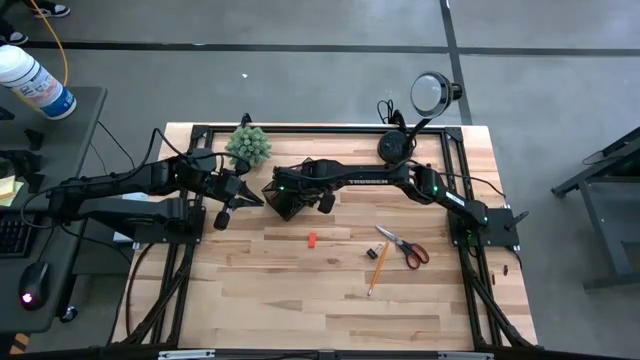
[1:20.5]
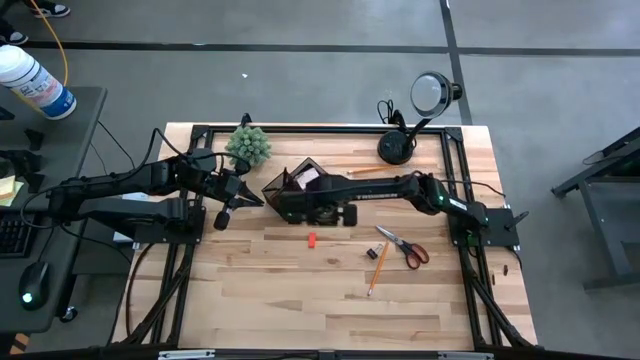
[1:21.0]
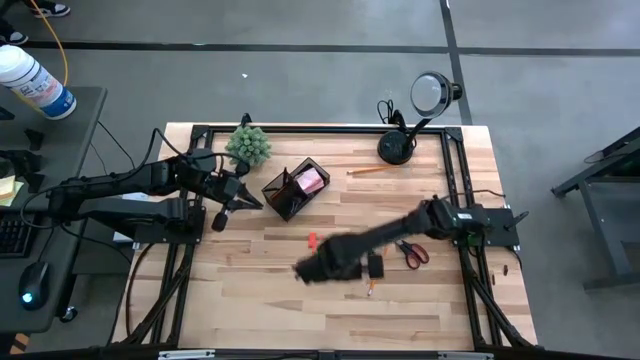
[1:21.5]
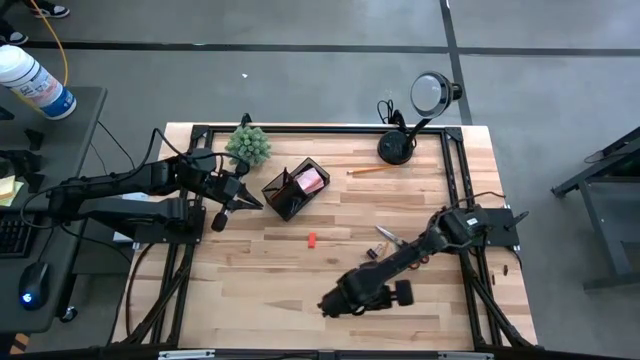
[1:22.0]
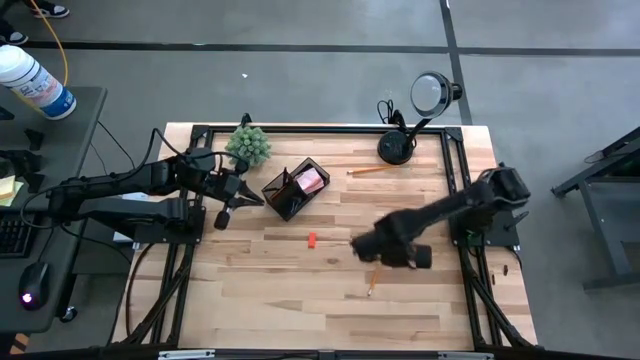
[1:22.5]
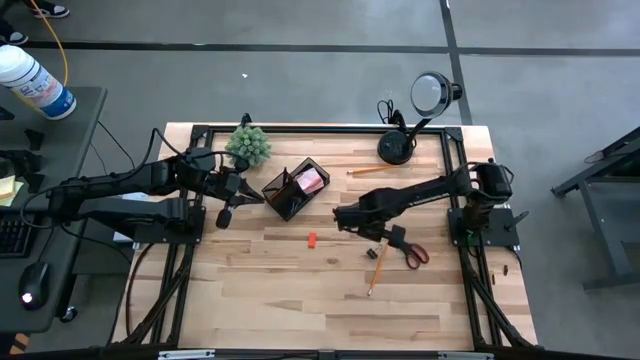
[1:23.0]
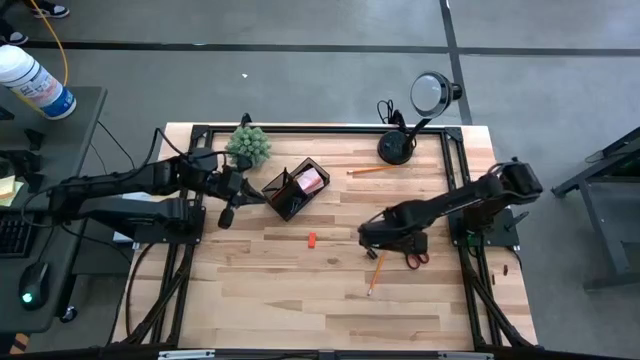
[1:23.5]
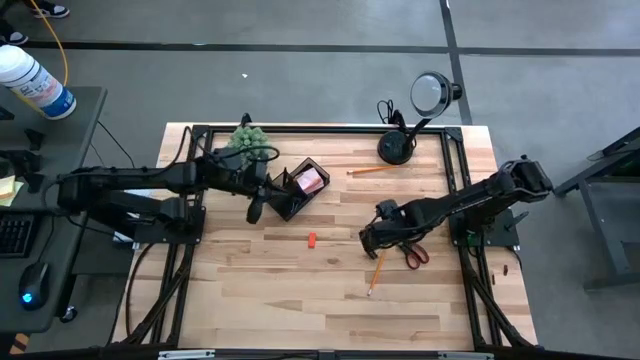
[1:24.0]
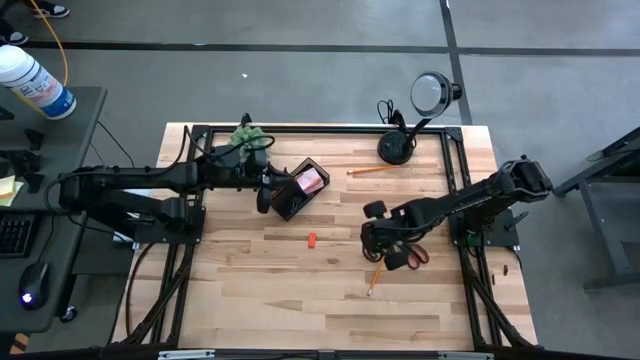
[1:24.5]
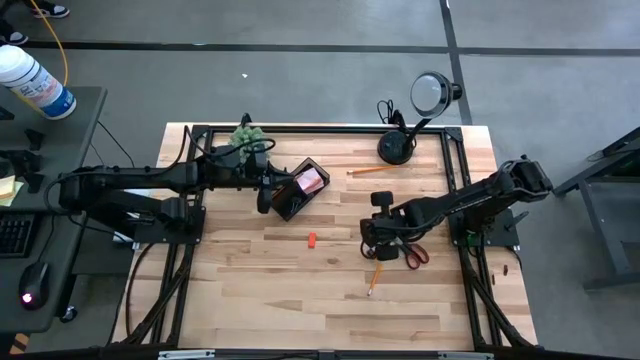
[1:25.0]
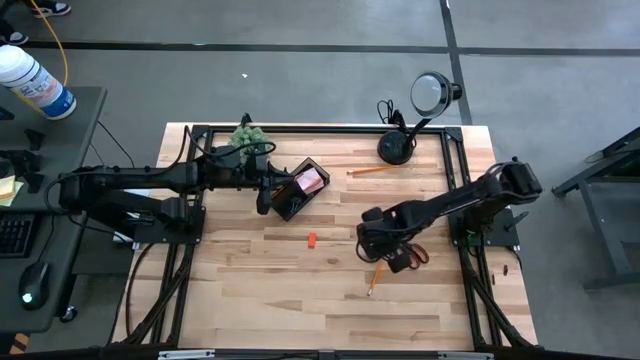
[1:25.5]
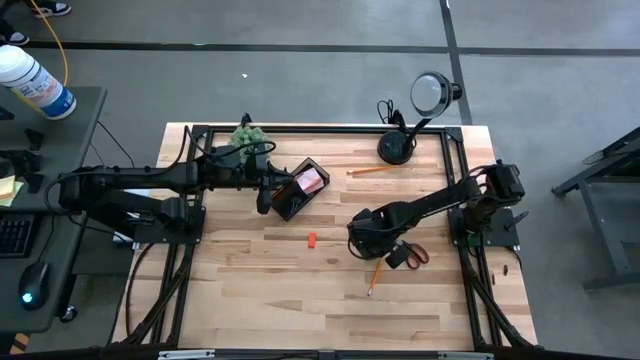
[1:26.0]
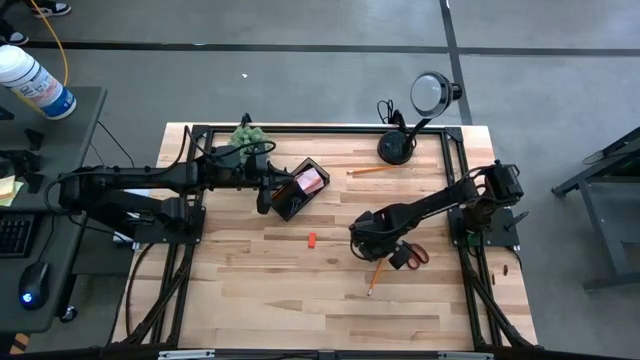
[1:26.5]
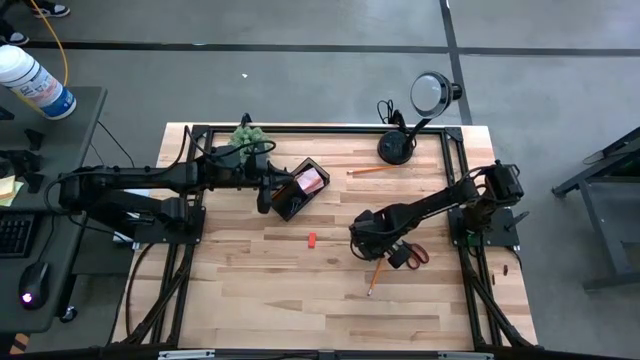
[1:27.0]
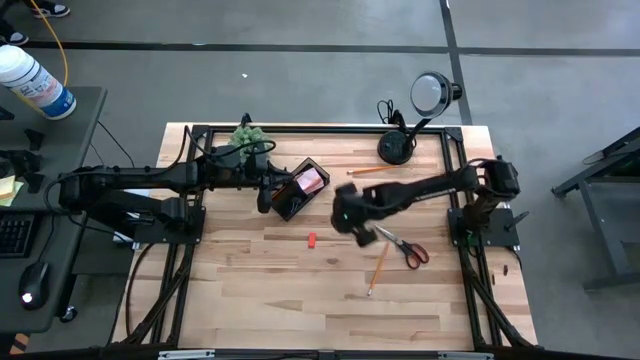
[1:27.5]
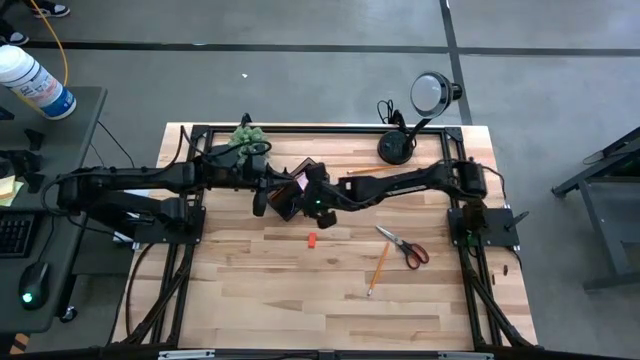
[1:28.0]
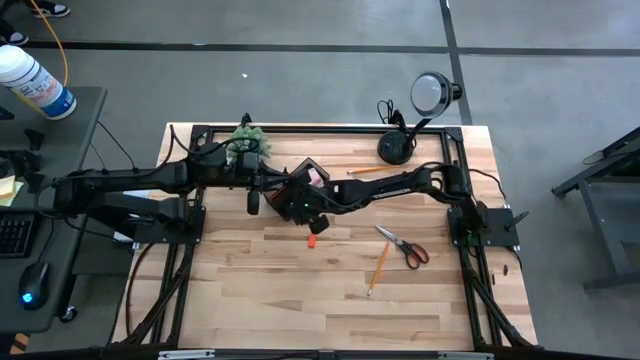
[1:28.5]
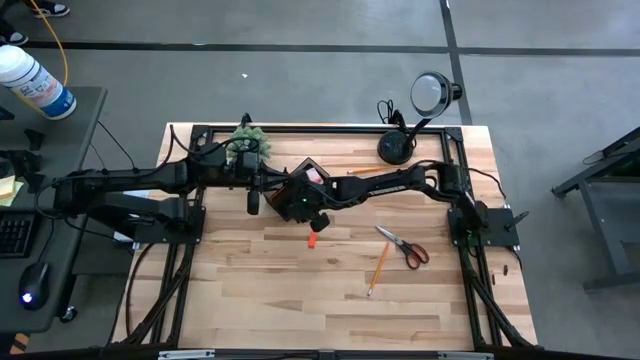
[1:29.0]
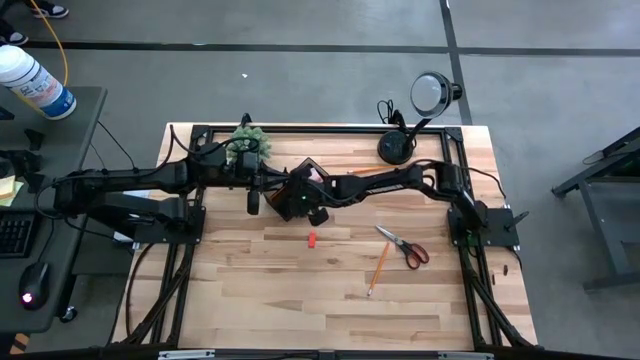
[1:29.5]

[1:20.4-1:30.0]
Task: Pick and place office supplies into organizer
Put the black binder clip into the black desk organizer

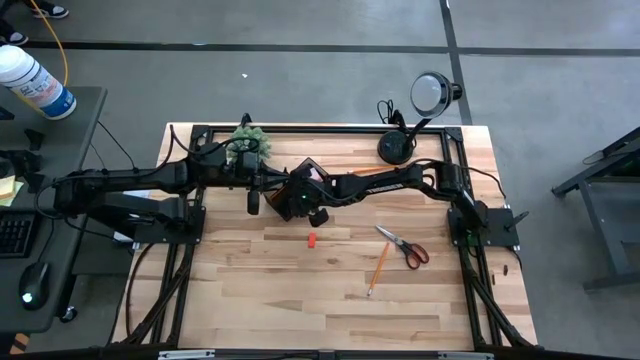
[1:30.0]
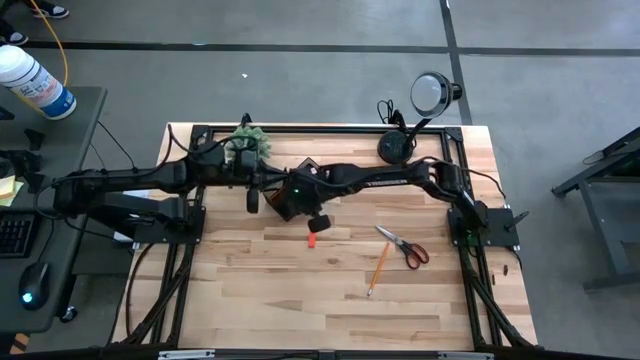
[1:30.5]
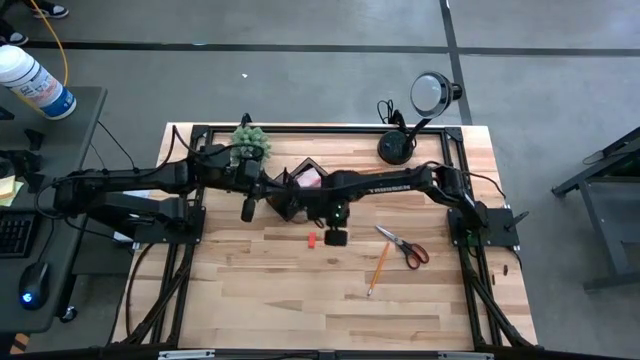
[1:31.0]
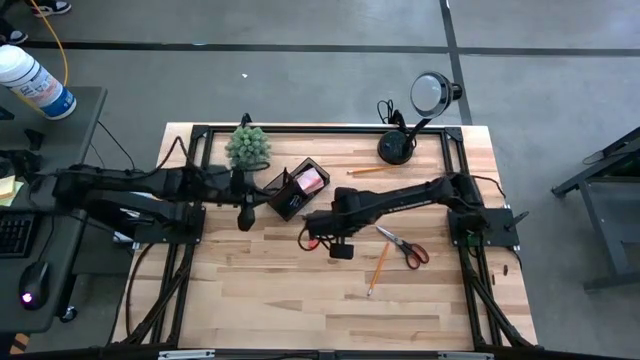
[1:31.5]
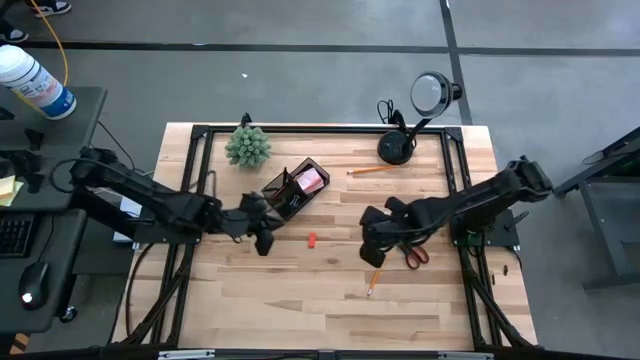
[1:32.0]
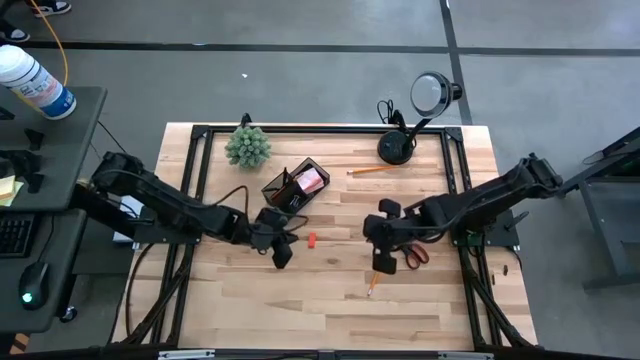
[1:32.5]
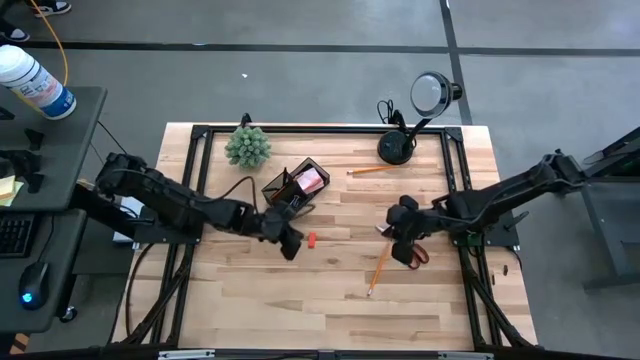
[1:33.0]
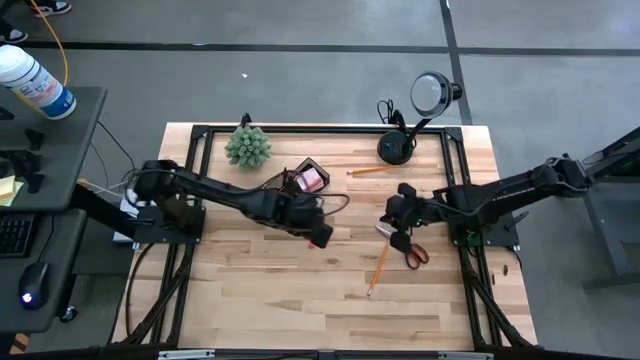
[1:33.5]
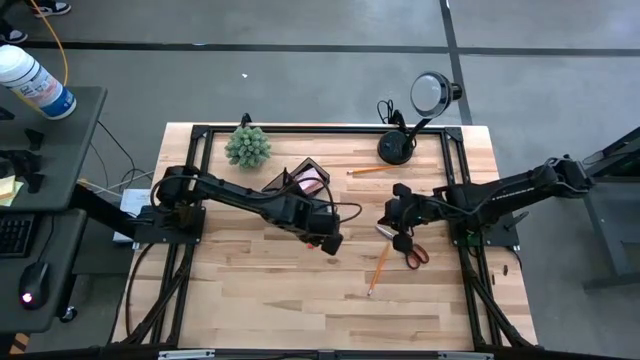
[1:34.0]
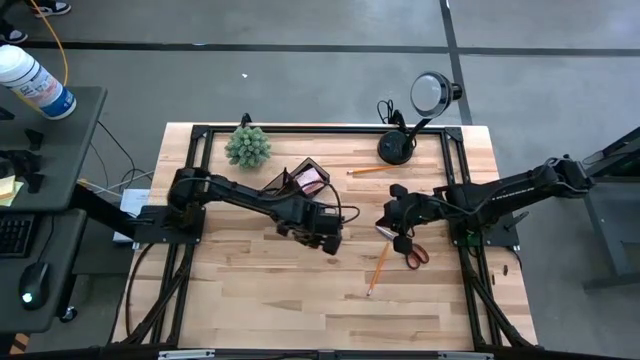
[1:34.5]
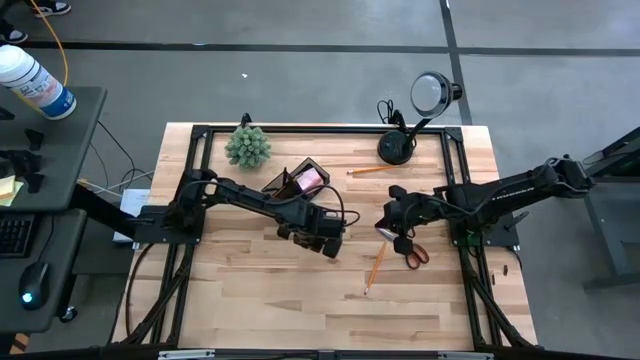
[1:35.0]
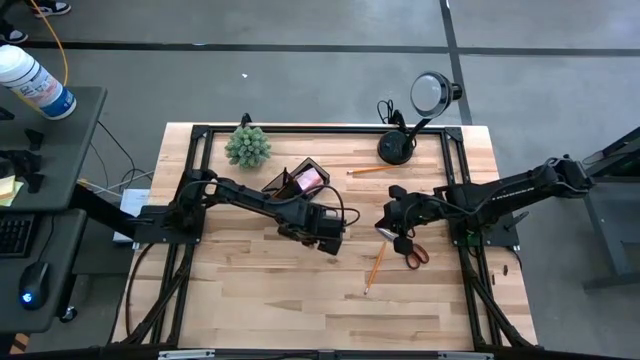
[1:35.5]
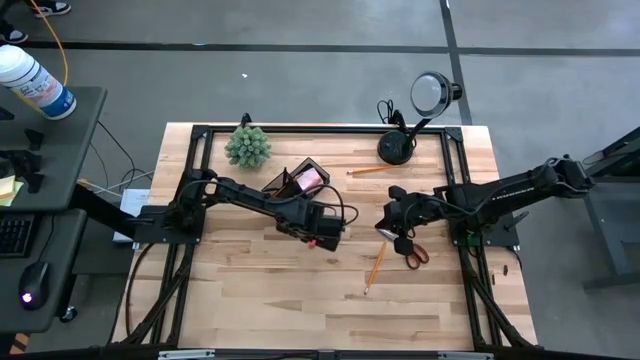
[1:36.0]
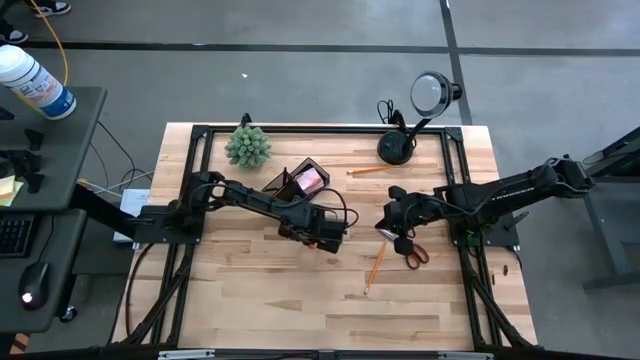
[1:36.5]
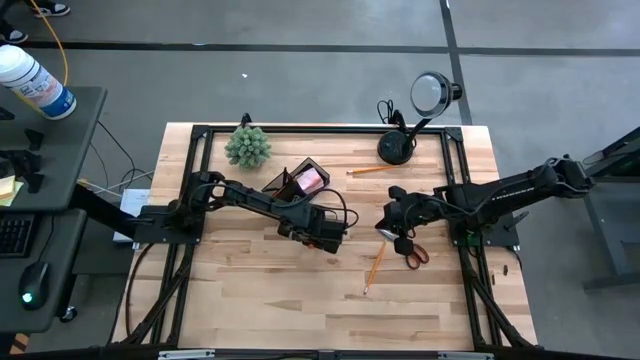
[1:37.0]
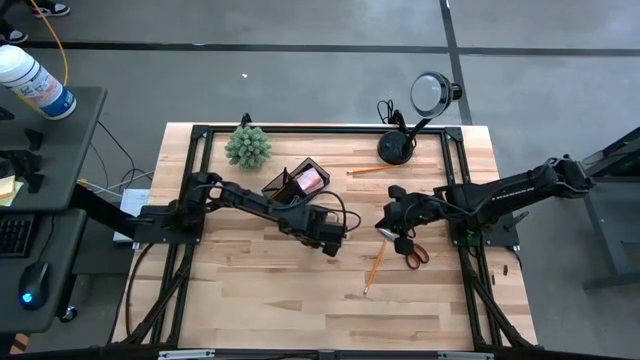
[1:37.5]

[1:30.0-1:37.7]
Put the orange eraser into the black desk organizer
